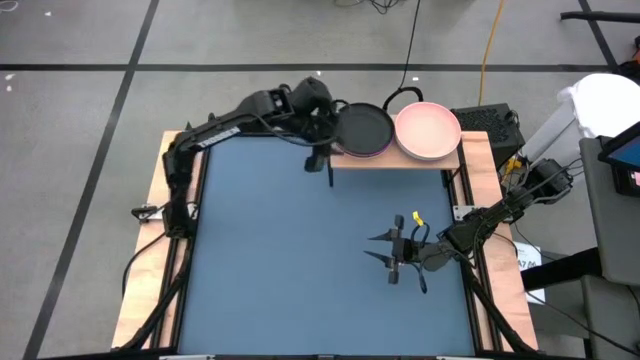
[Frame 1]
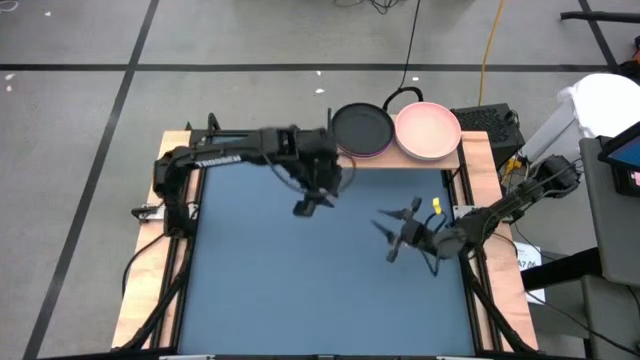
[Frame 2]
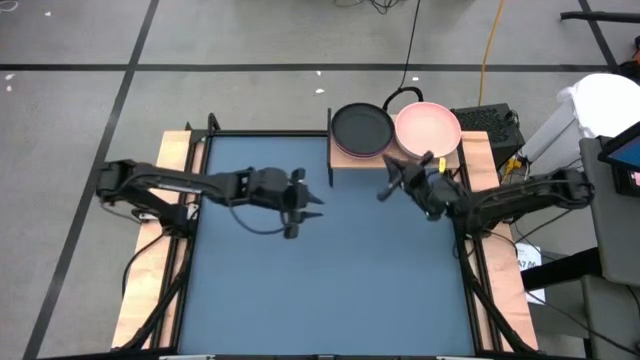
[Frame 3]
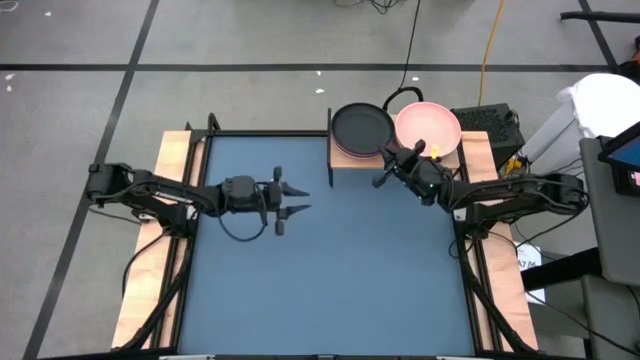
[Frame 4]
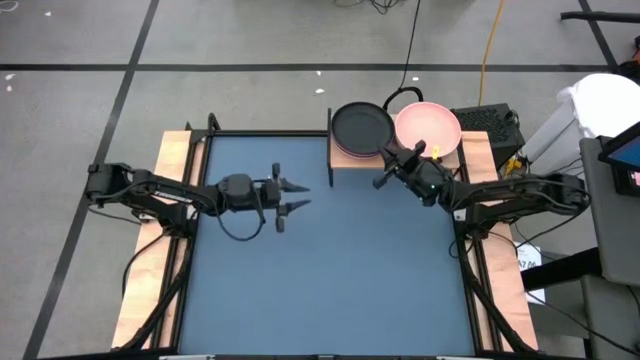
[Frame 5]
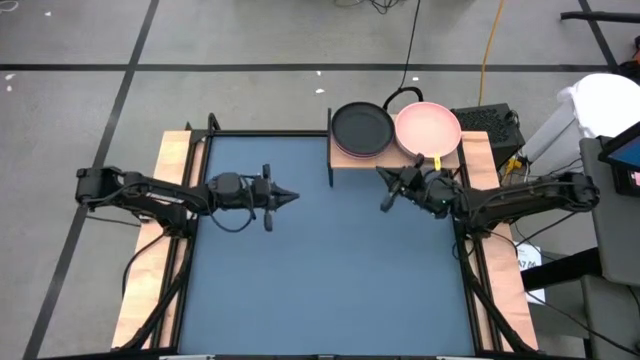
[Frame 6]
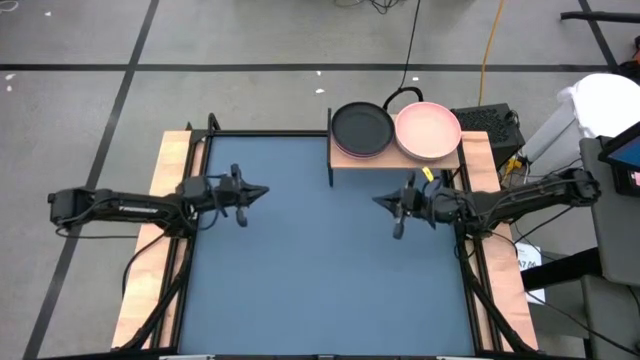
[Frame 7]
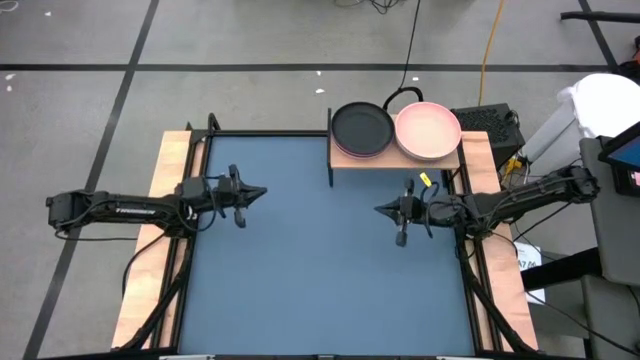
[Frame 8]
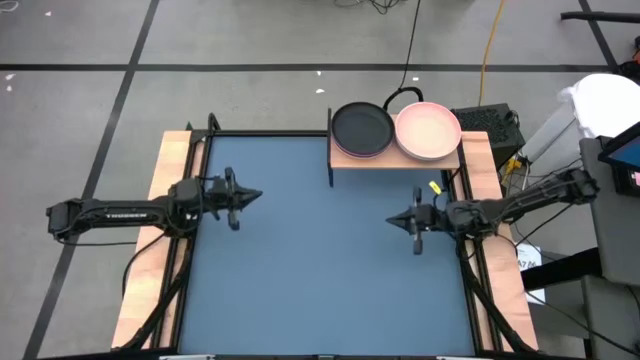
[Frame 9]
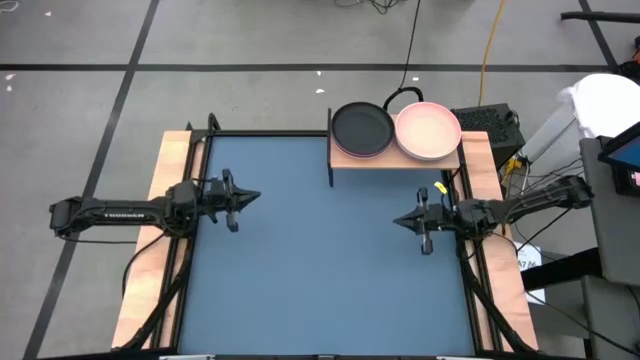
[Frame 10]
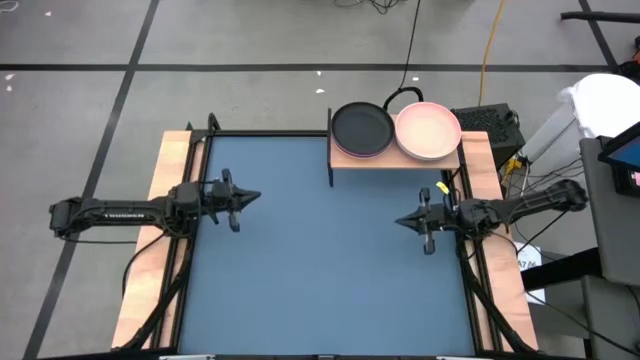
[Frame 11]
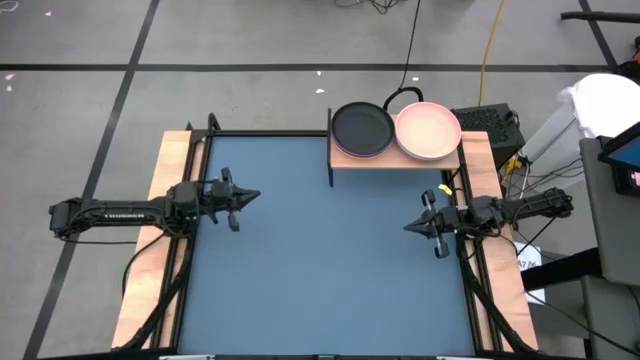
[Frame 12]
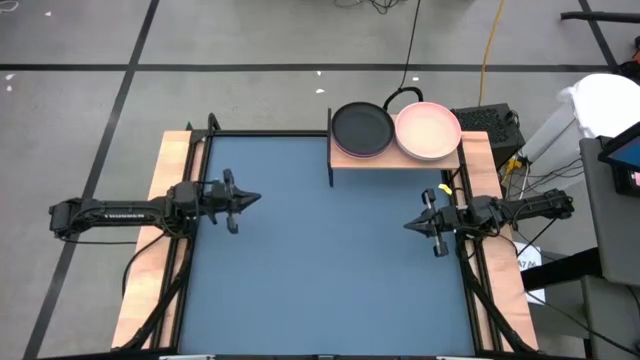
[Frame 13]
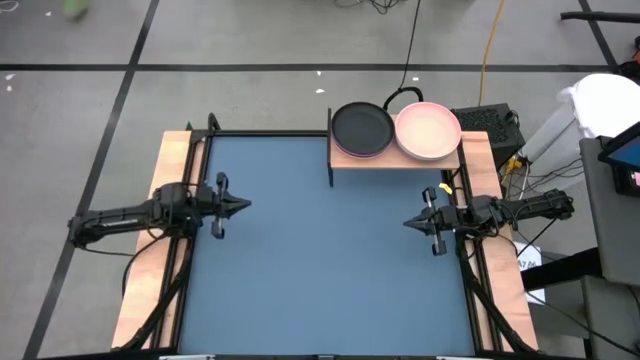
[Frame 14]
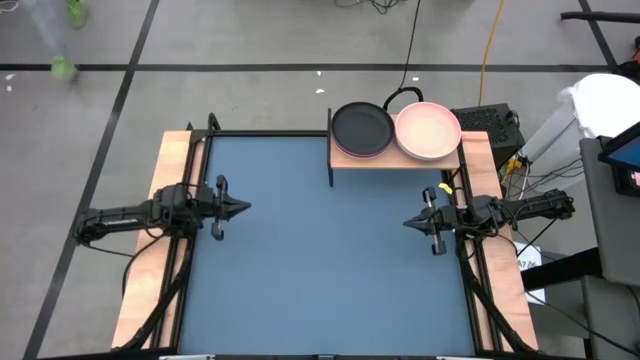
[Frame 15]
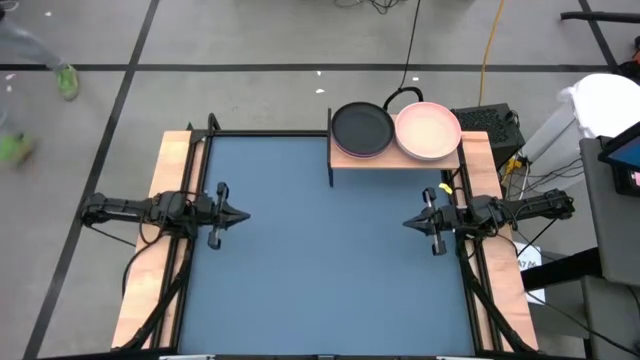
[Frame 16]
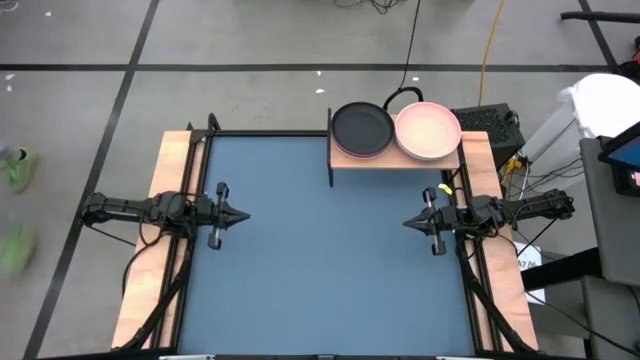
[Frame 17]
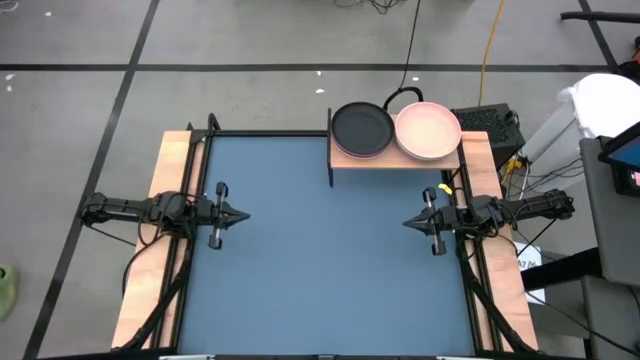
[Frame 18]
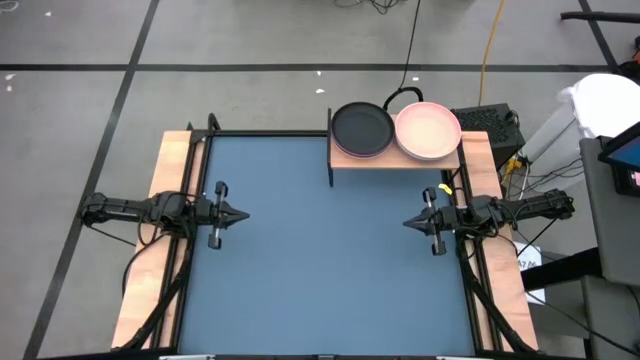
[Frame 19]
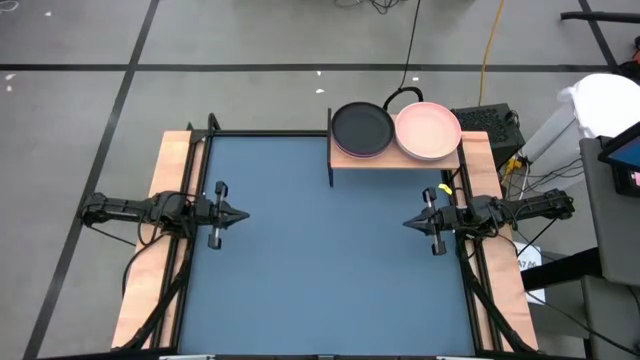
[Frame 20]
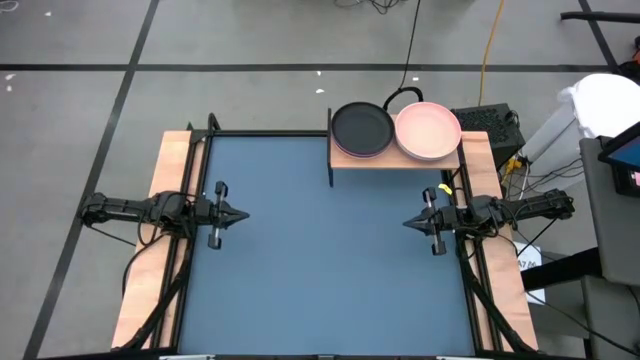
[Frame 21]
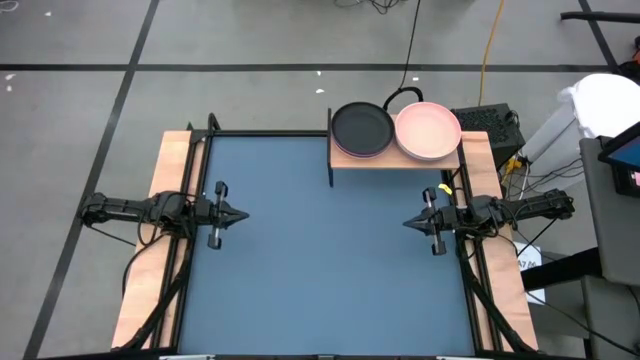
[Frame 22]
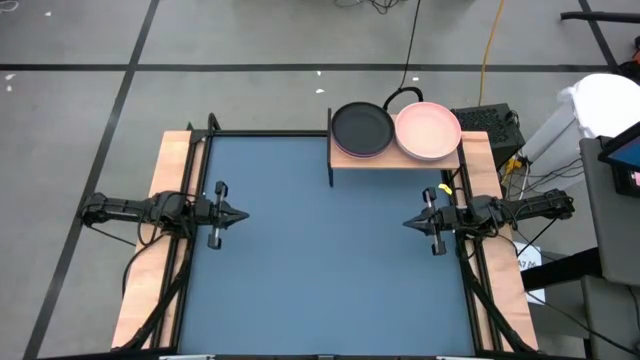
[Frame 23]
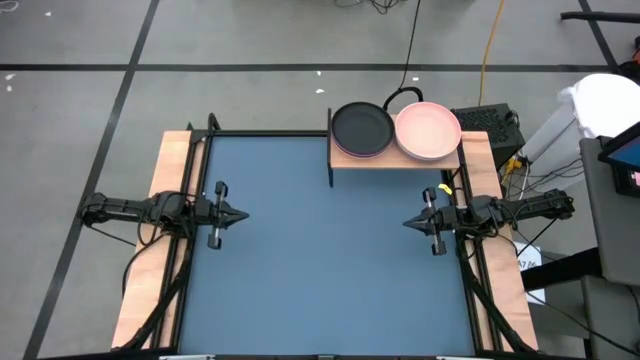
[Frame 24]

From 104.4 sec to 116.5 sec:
Task: Place and stack plates onto a shelf
Return to Home Position
